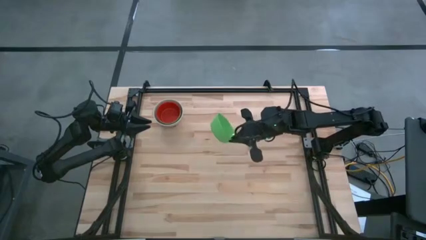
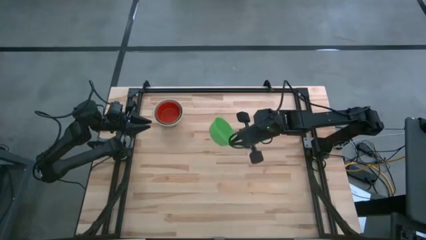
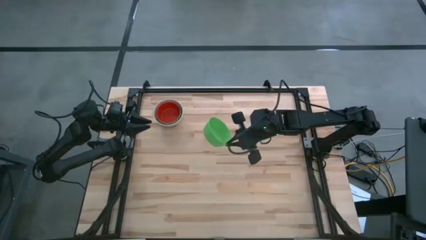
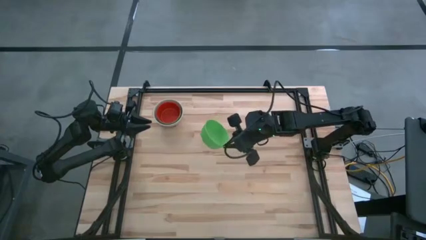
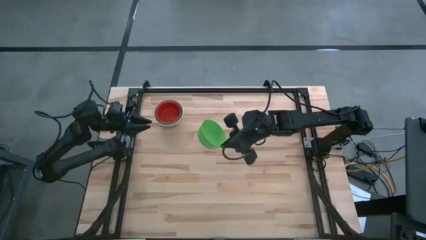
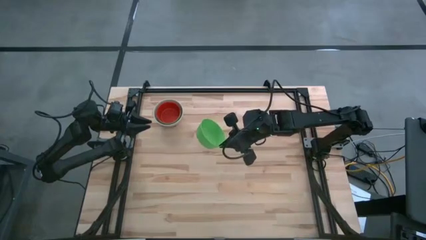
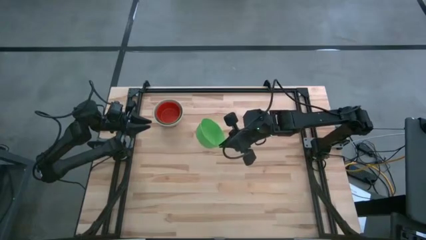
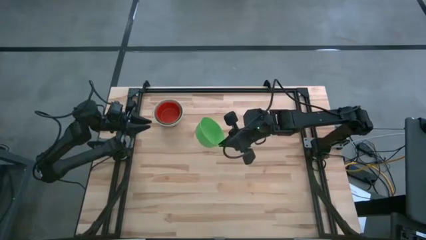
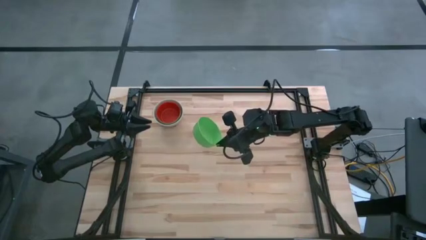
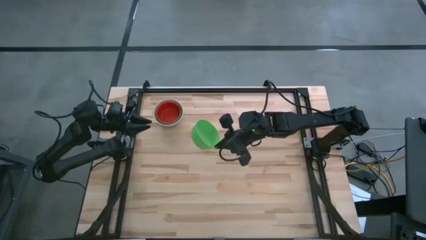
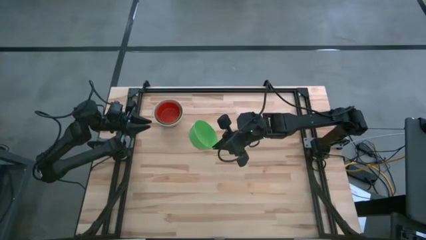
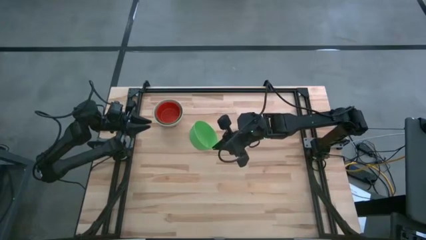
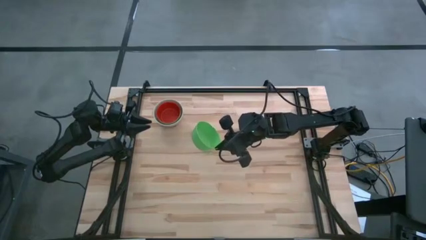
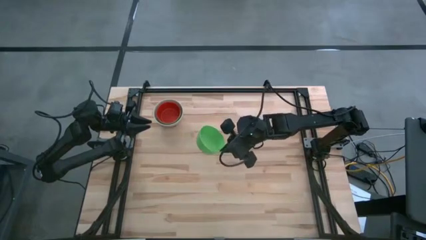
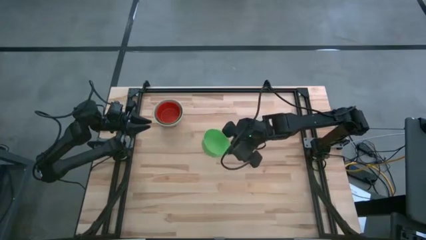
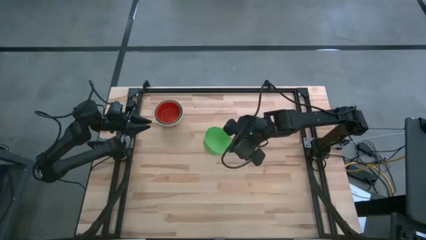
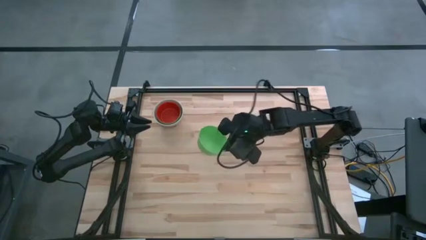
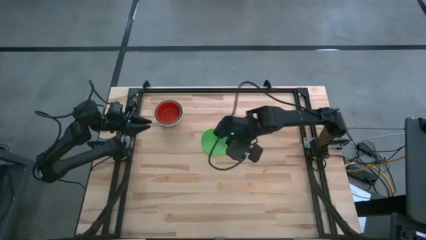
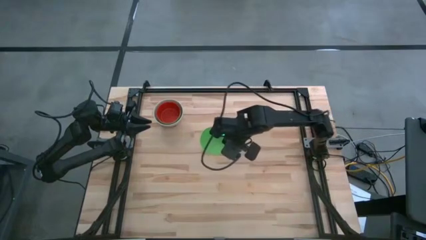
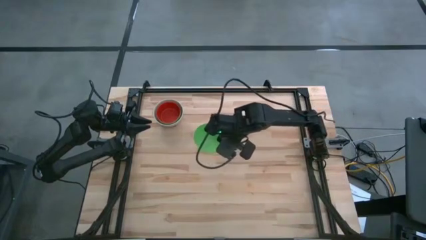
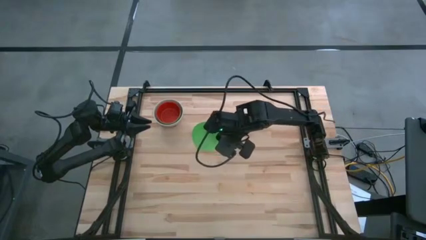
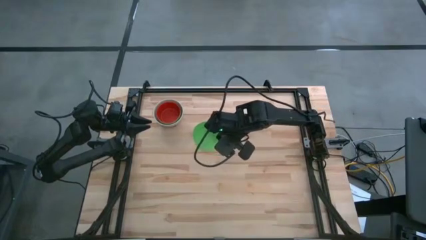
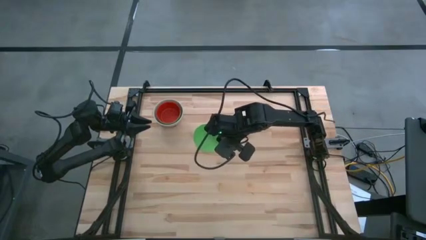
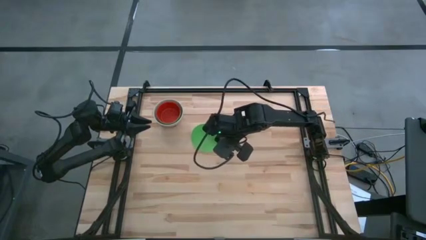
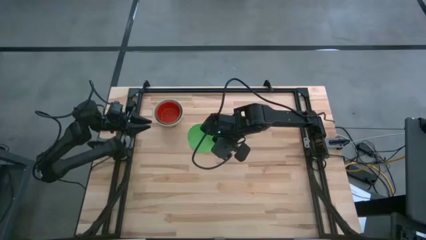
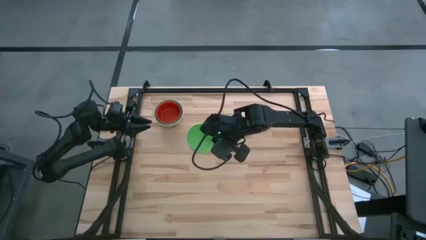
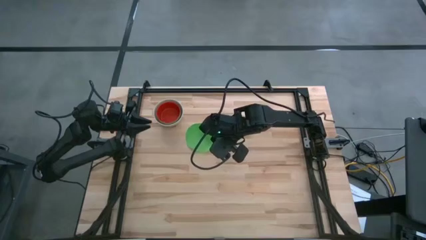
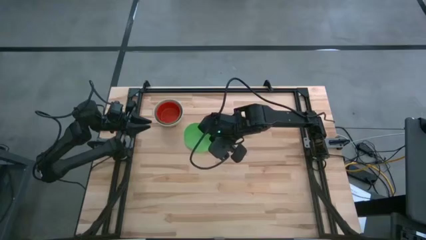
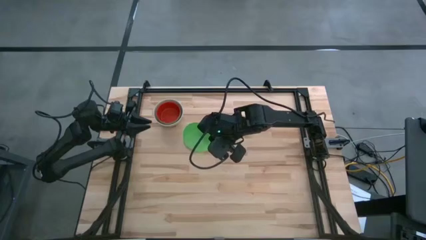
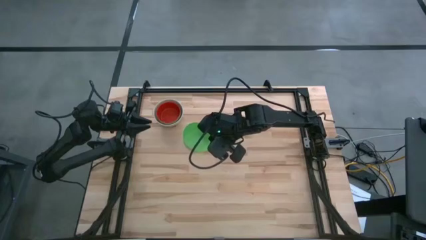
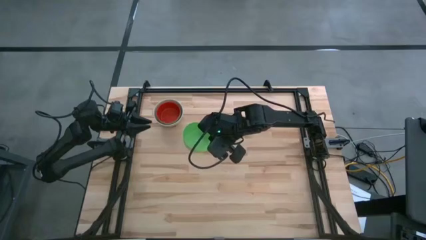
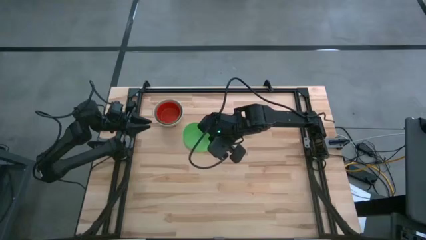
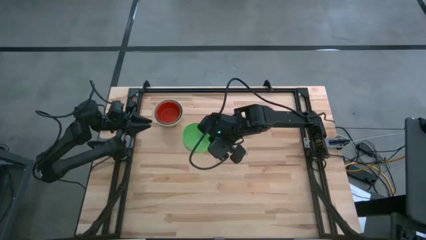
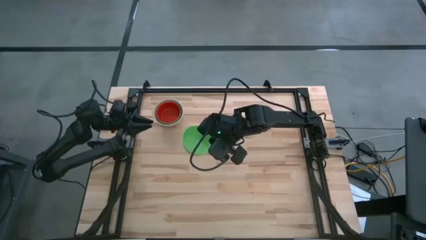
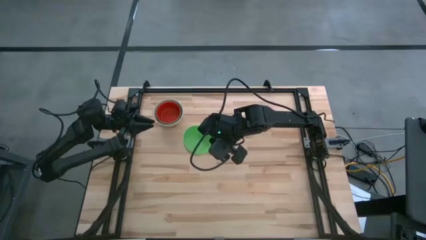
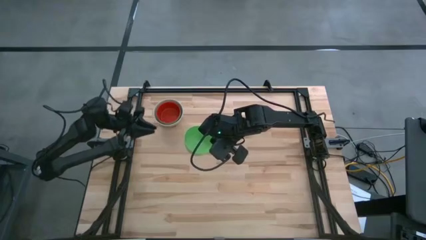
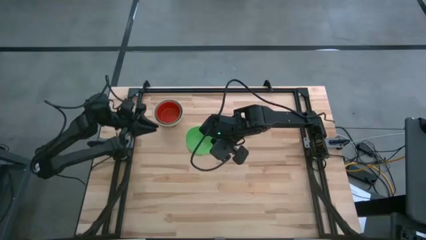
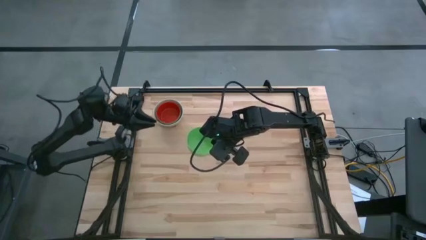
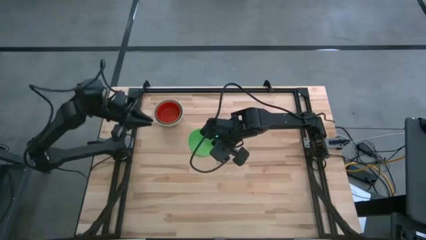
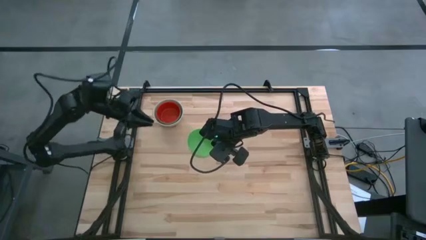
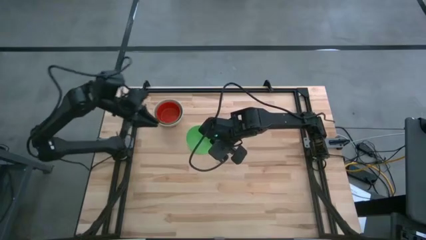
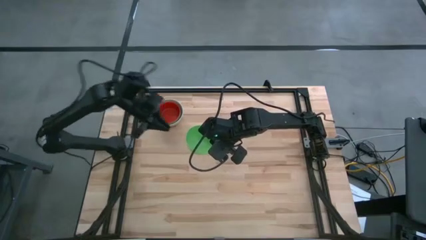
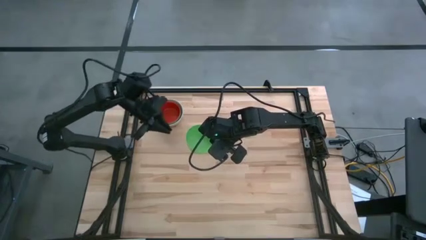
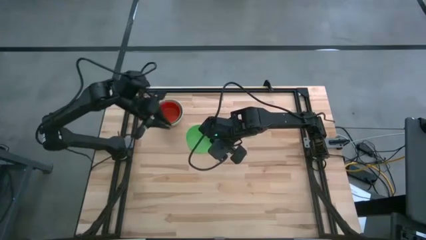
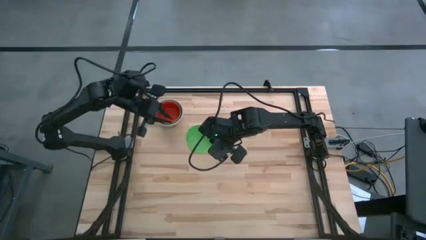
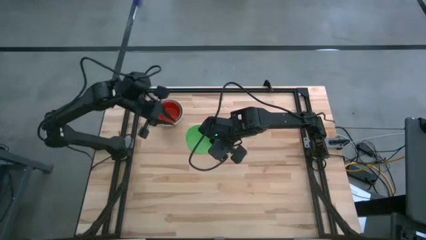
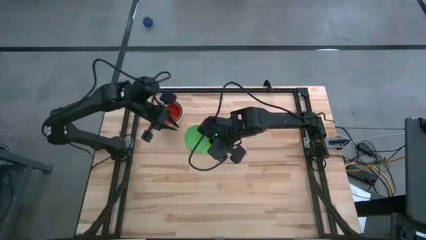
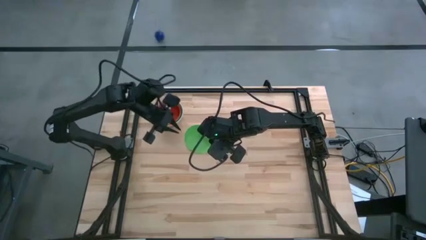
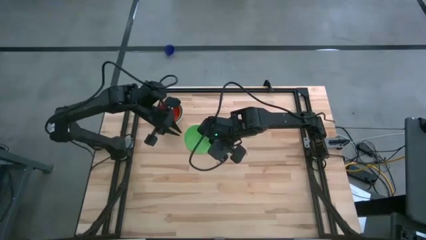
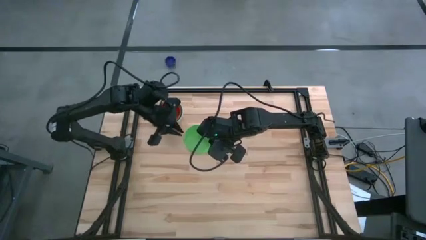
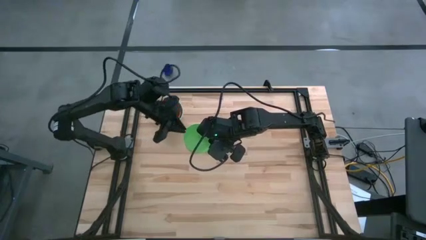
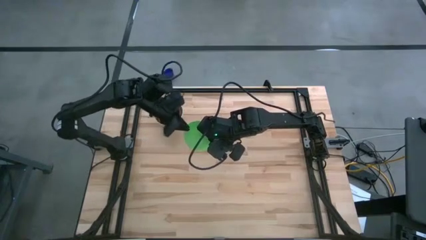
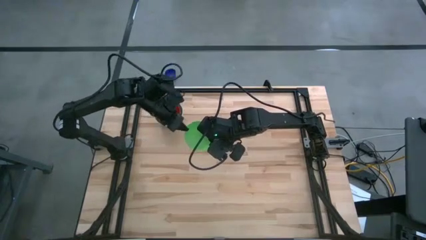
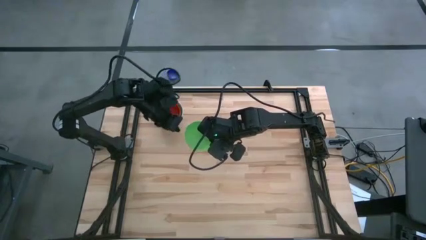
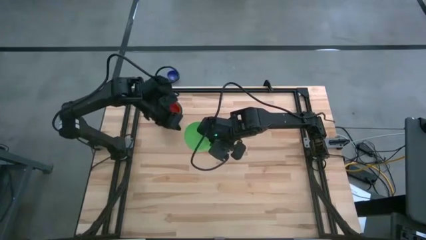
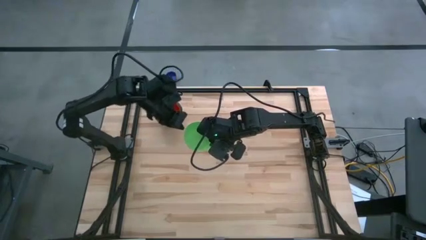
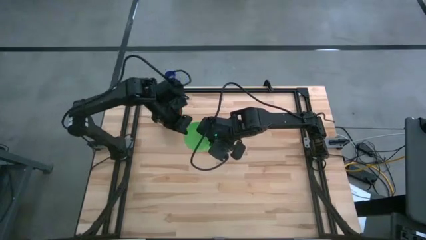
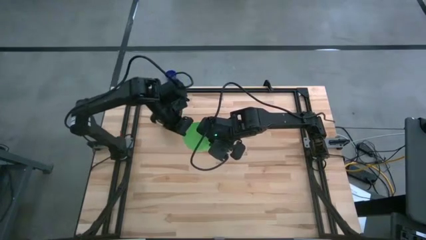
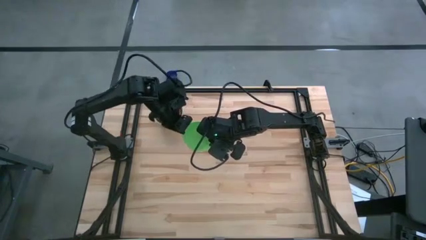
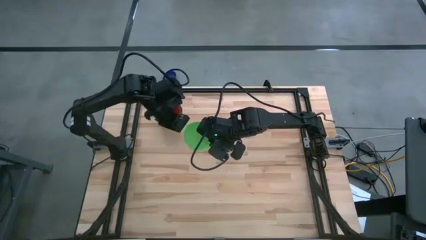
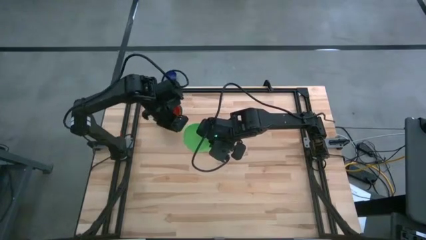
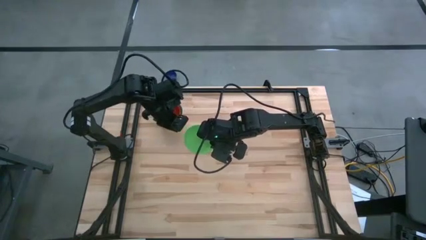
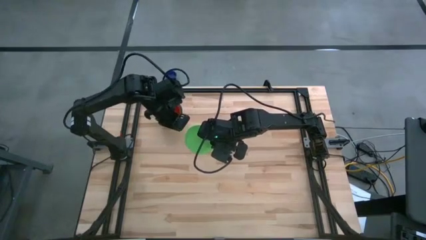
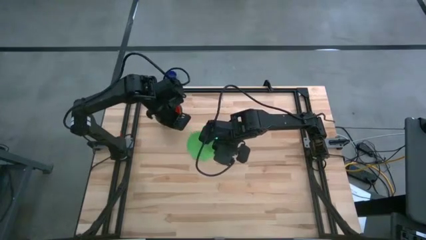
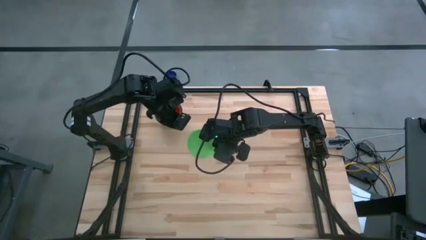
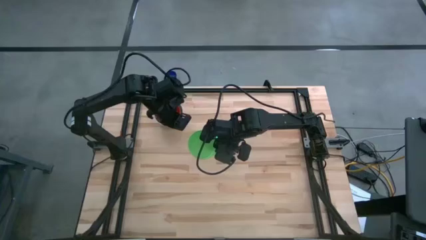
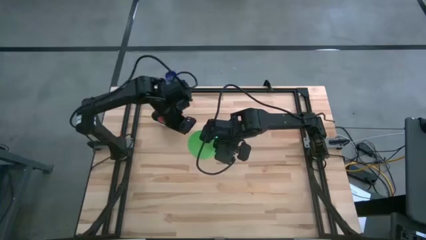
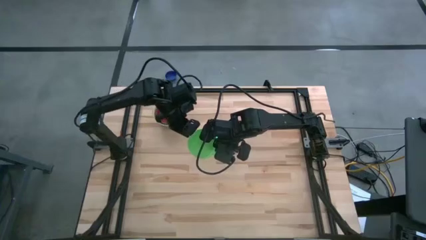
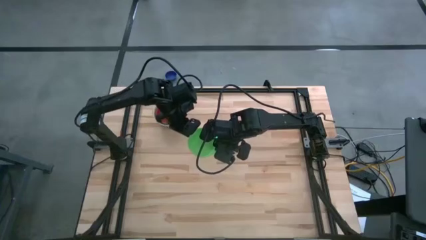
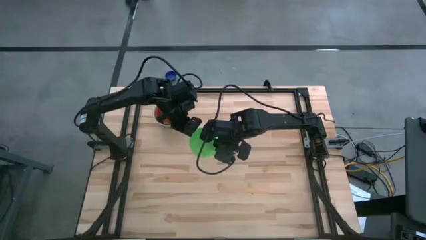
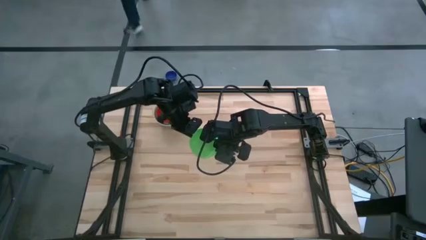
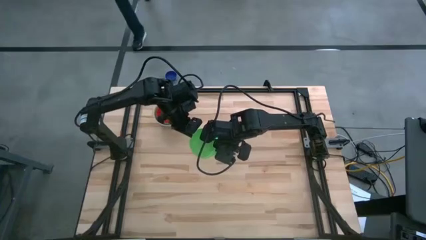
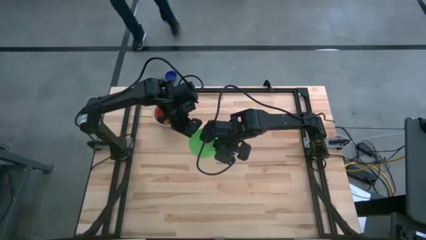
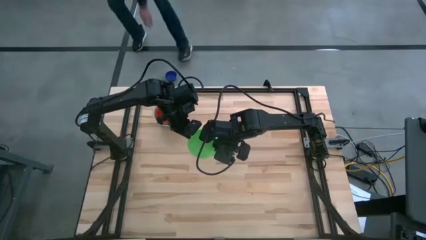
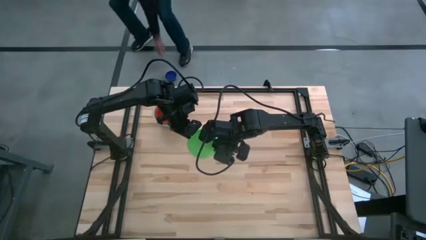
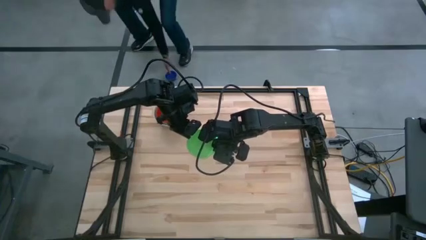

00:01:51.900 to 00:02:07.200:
Stack the green bowl on the red bowl
